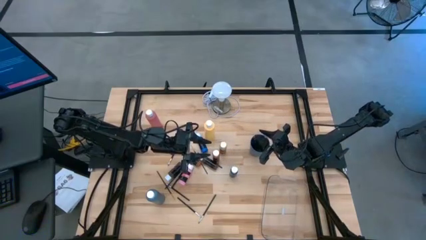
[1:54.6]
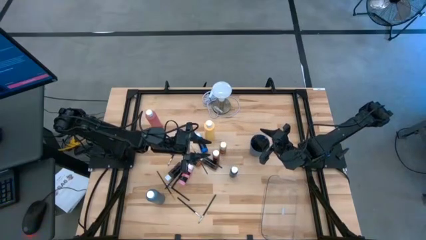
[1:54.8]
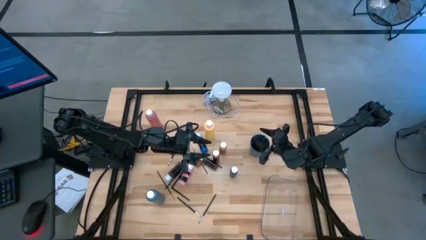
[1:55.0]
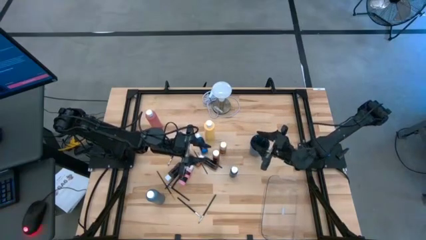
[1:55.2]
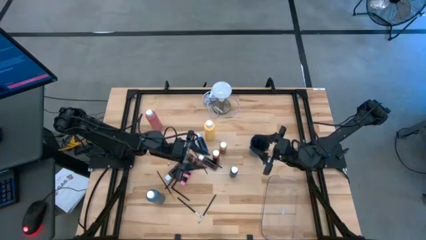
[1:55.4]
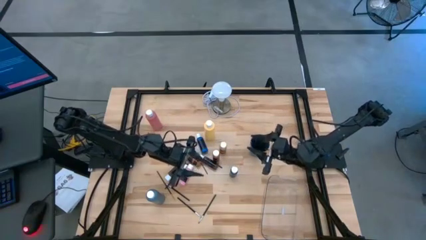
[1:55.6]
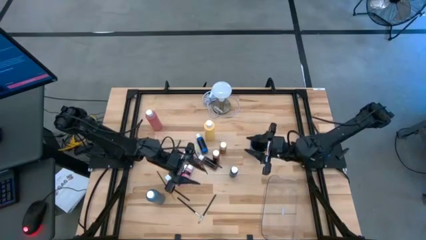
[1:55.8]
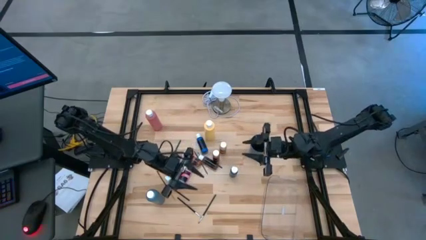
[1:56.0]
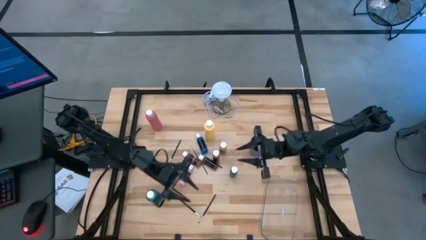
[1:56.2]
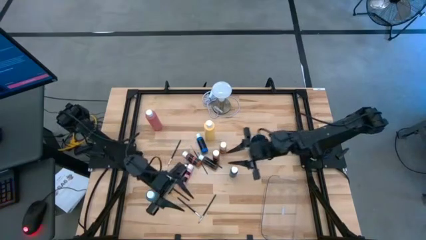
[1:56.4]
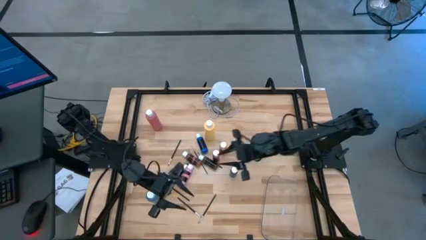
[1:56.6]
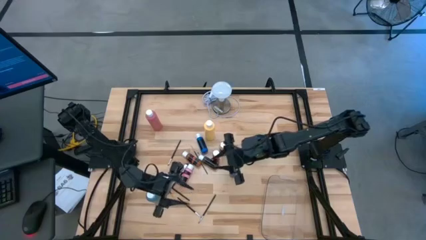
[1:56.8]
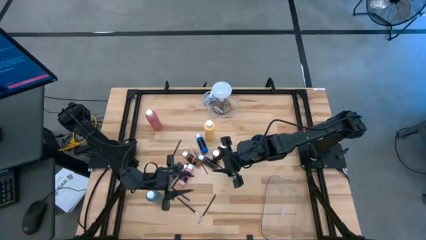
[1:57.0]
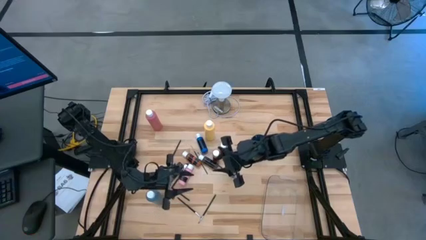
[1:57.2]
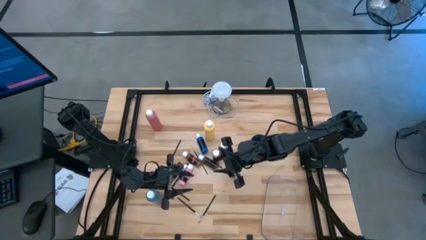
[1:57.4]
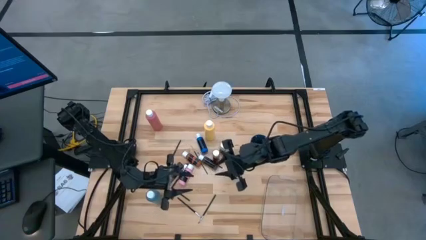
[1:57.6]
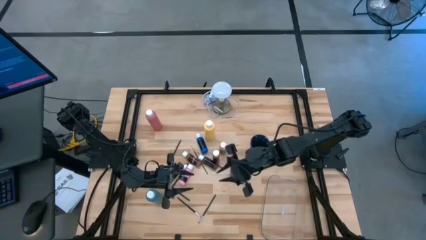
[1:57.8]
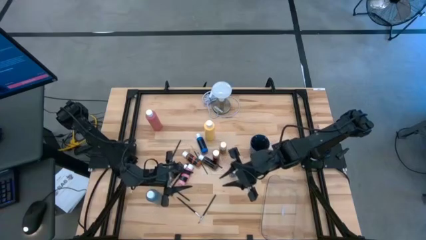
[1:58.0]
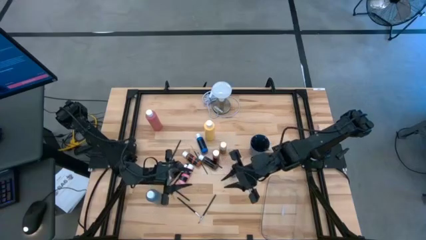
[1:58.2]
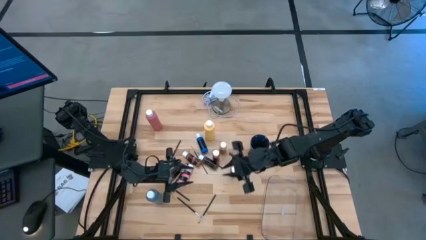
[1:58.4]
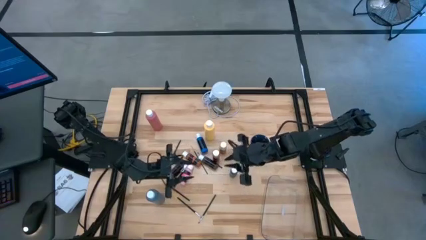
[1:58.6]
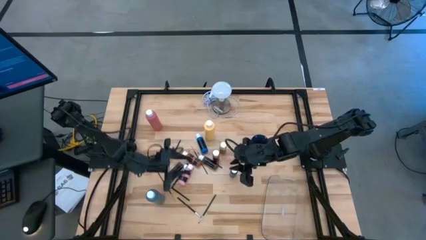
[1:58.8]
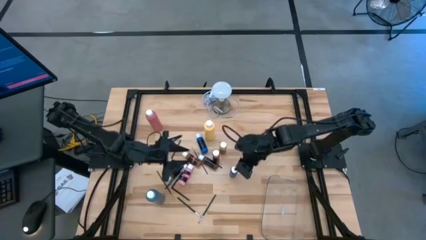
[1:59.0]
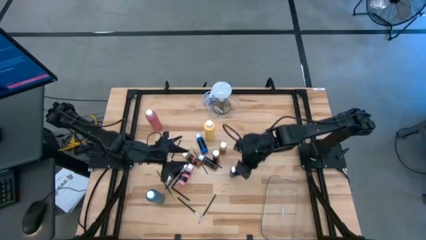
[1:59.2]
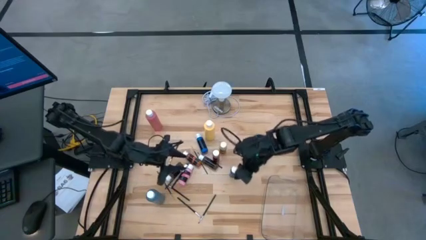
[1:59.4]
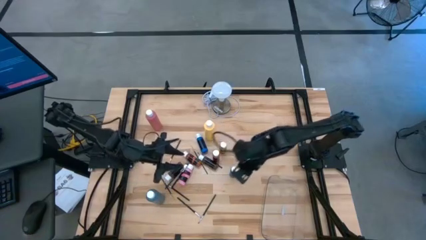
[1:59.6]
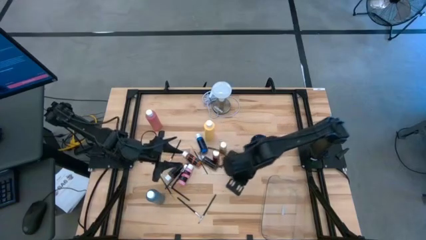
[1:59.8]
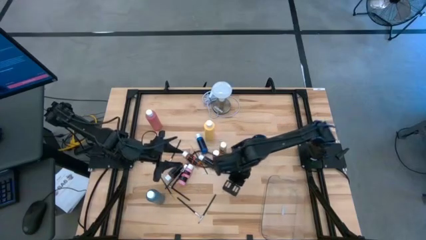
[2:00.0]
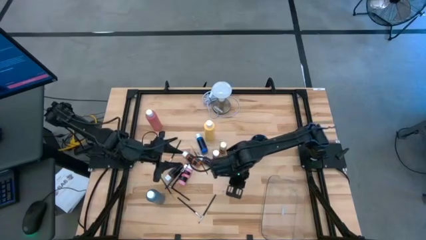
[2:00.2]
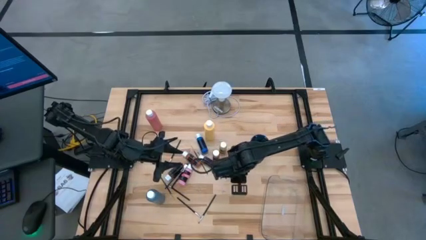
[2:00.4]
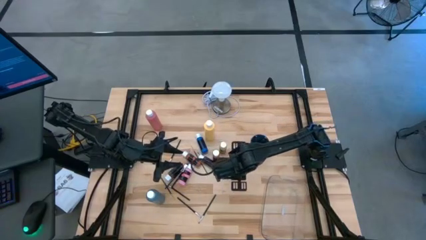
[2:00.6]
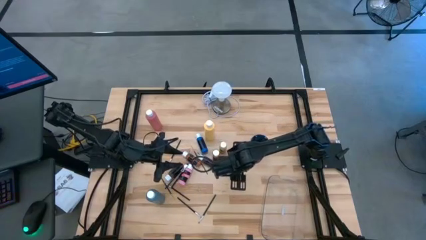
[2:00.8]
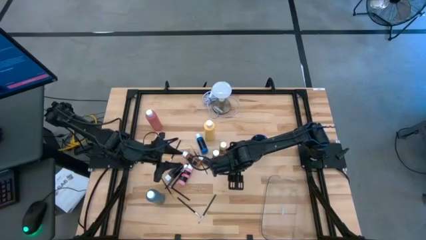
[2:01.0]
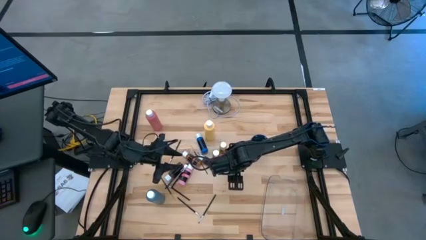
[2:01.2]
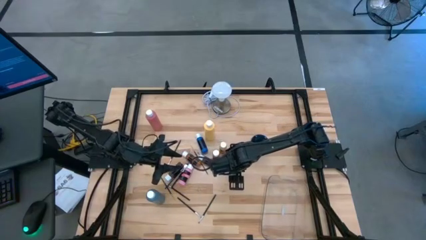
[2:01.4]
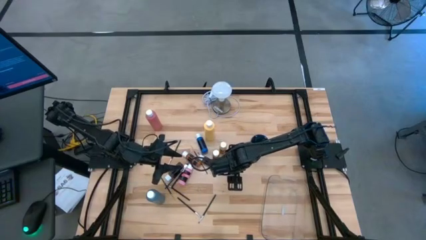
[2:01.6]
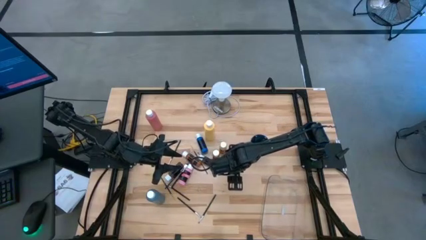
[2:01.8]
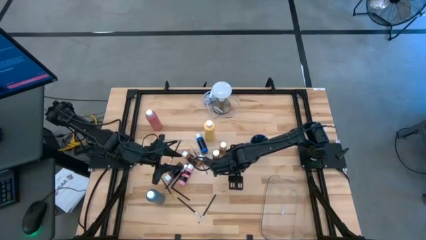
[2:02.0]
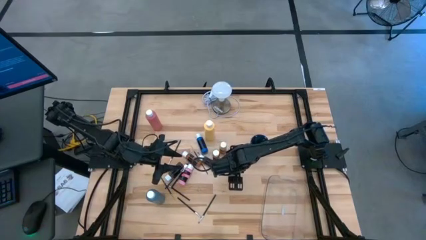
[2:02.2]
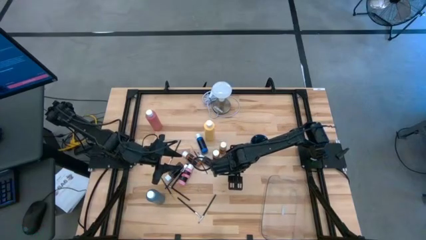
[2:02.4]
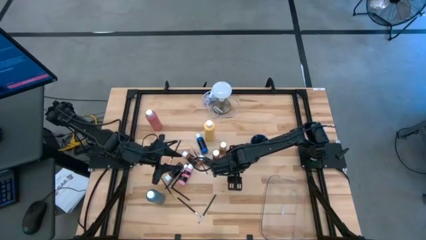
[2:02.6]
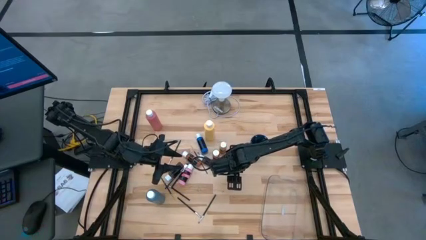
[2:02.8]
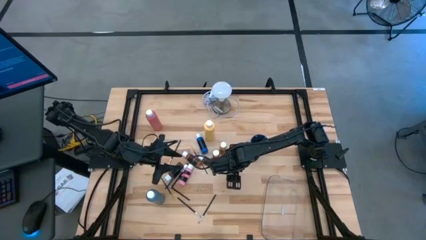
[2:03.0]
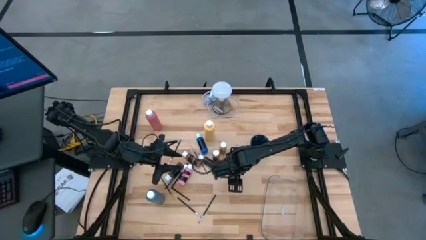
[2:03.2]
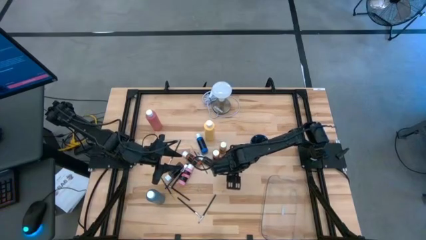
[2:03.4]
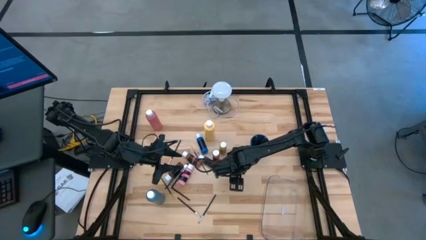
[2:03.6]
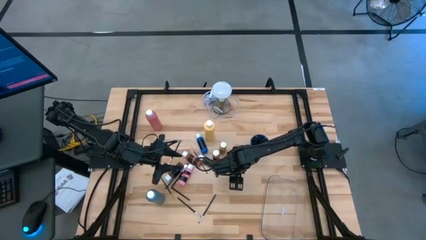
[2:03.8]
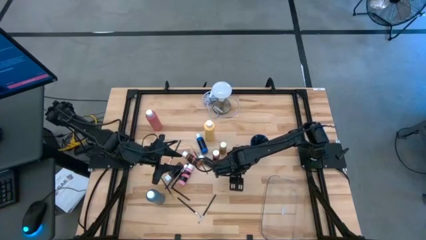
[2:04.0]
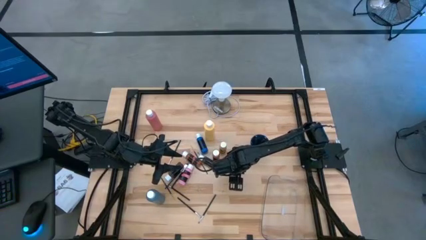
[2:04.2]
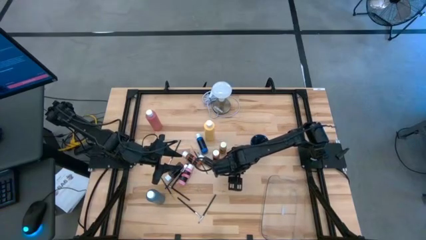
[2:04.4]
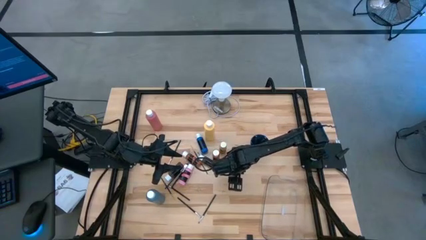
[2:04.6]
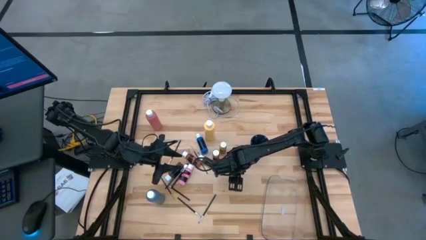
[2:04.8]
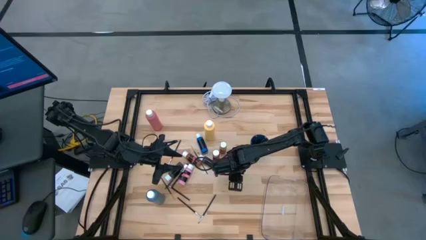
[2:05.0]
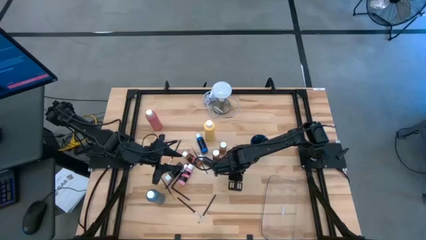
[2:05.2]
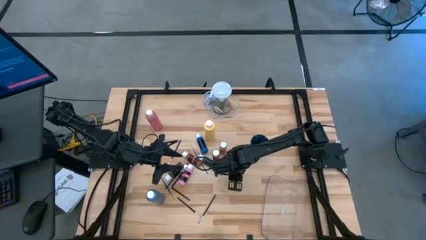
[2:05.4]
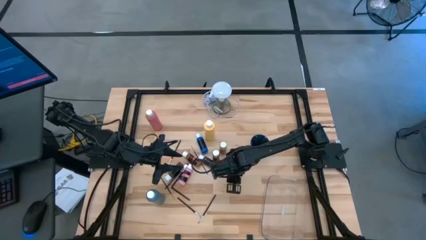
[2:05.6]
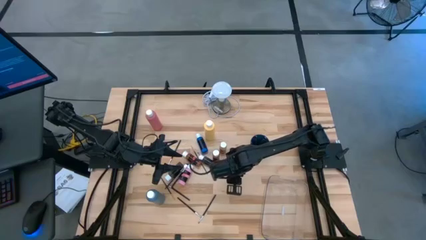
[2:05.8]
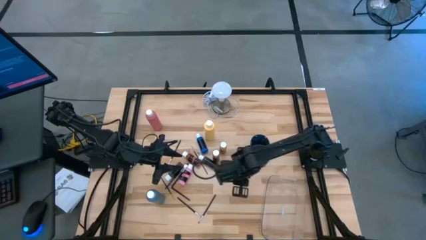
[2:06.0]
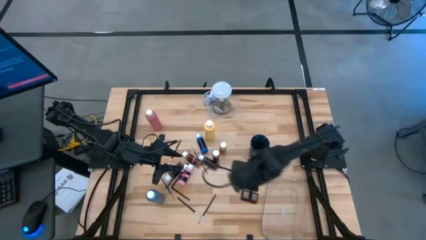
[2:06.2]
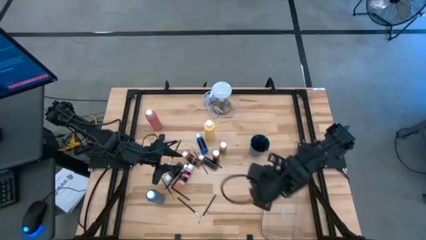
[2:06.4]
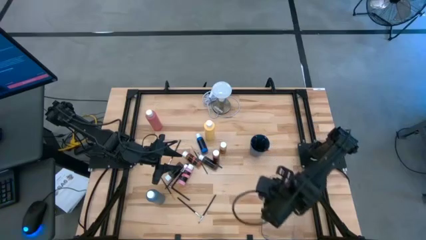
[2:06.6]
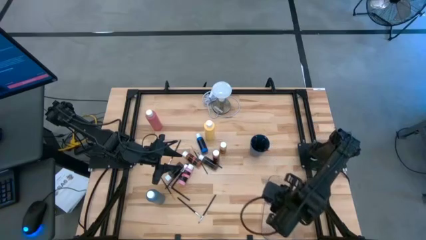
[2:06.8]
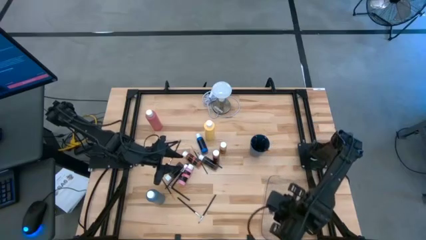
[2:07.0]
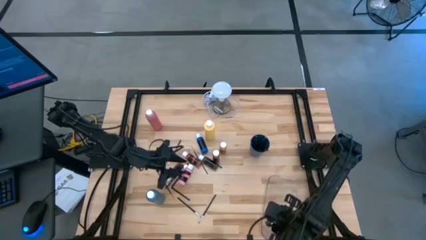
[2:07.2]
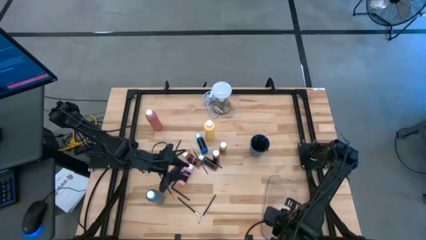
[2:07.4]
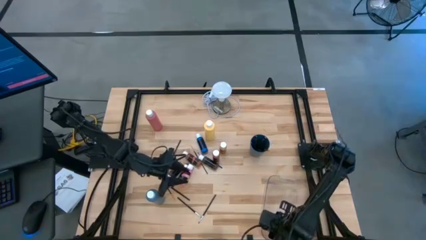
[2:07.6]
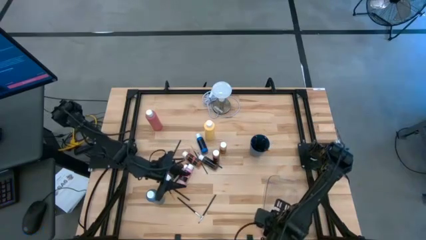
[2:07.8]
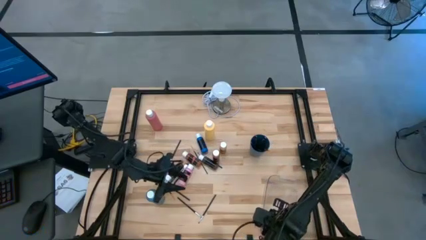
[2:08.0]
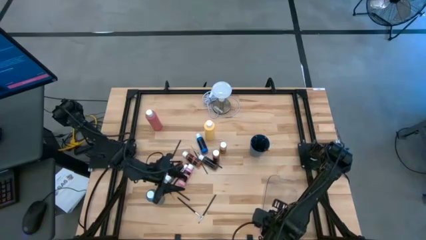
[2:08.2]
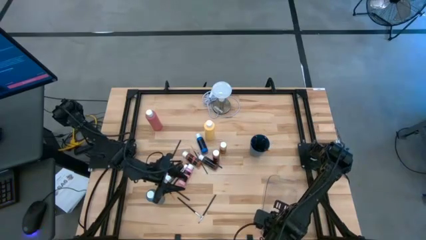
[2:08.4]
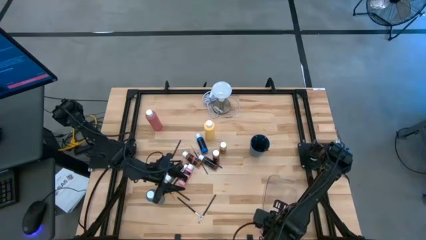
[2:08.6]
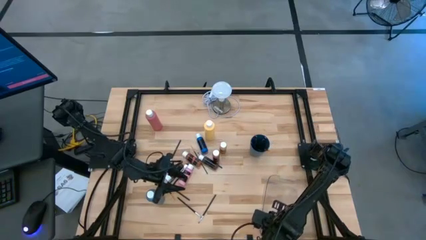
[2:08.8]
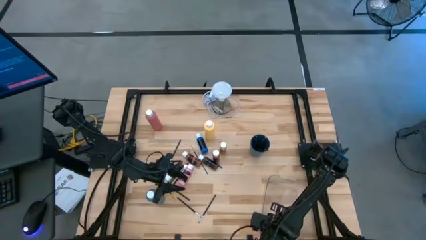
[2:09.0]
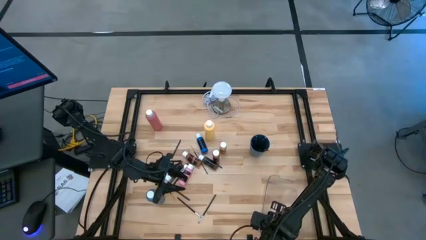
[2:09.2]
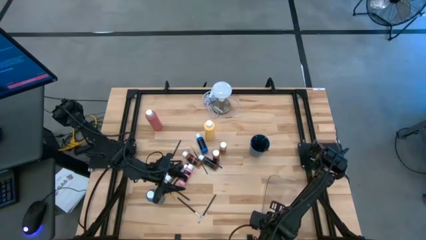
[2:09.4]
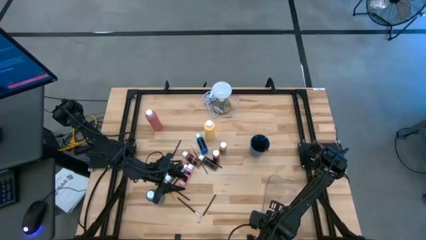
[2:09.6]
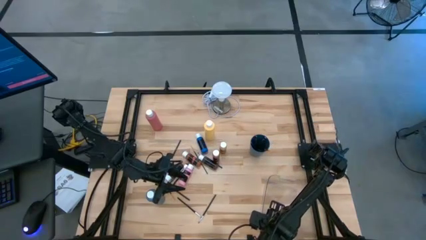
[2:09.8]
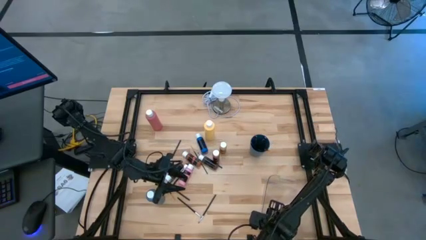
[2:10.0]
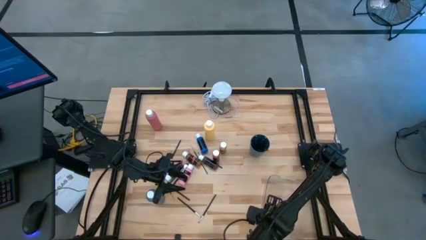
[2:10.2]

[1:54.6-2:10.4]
Task: Pick & Place Paint Supplies
Put the right small blue paint bottle into the transparent bin
